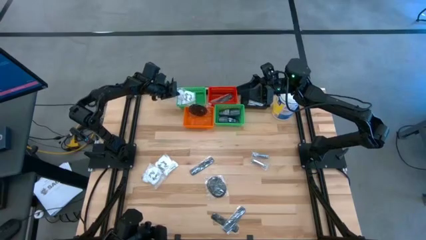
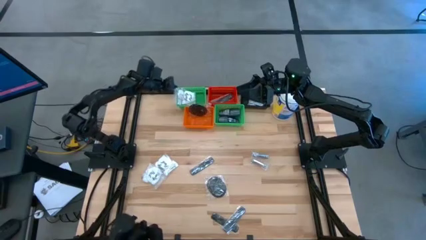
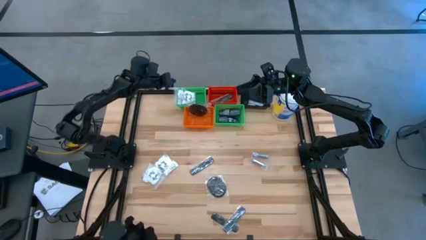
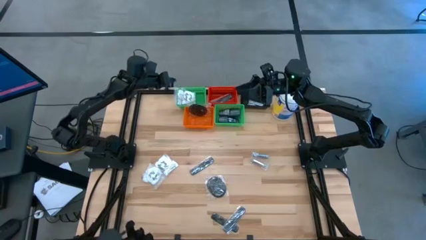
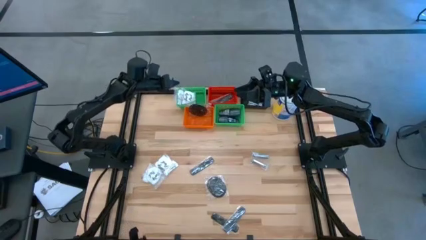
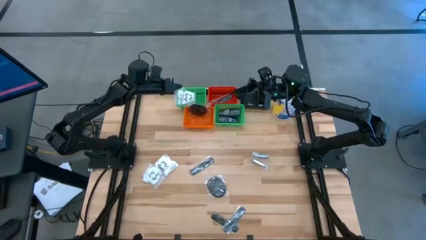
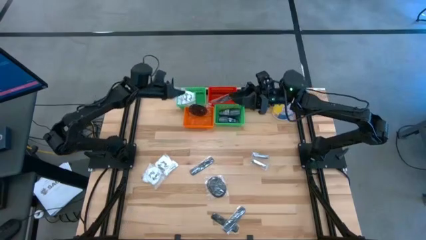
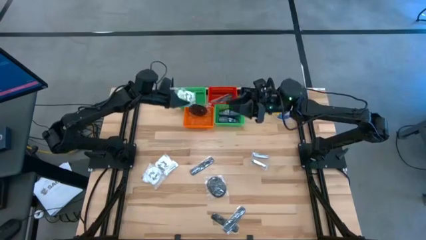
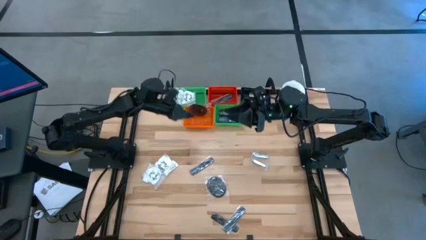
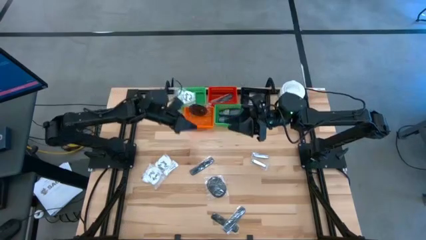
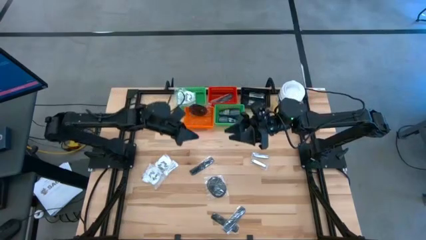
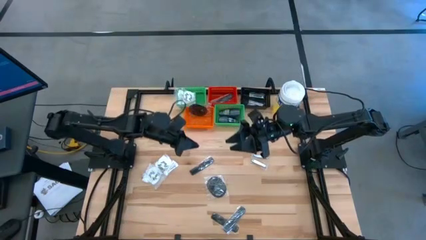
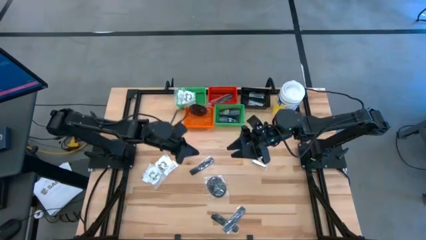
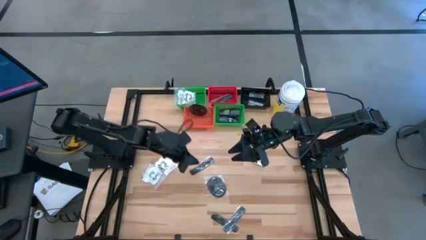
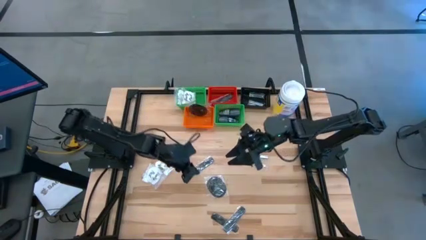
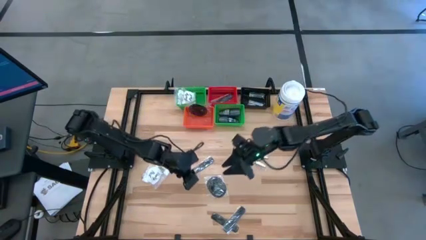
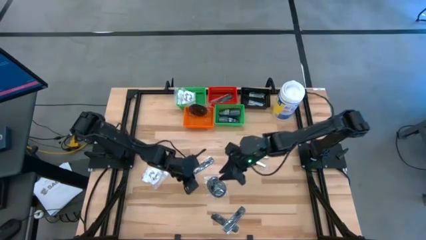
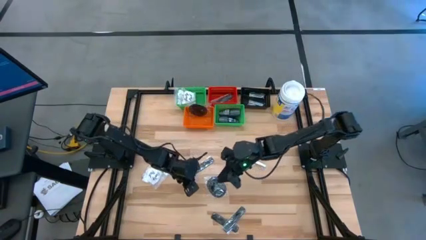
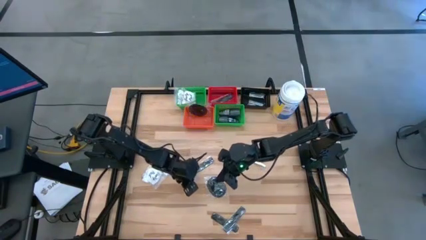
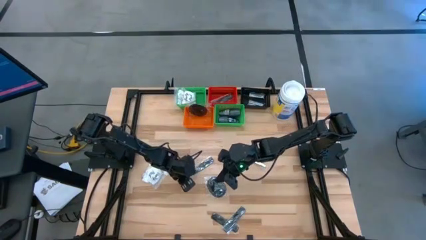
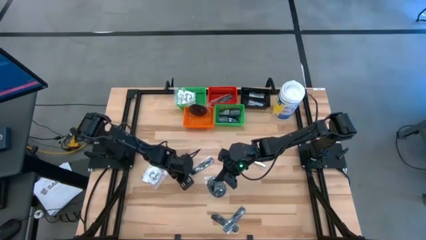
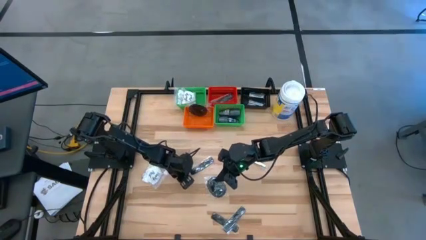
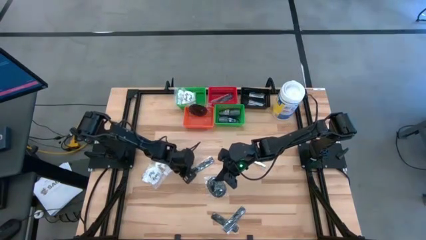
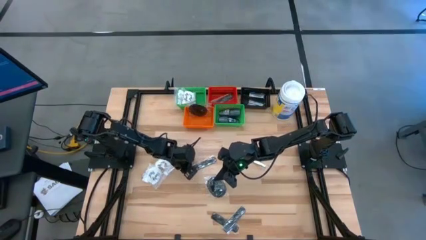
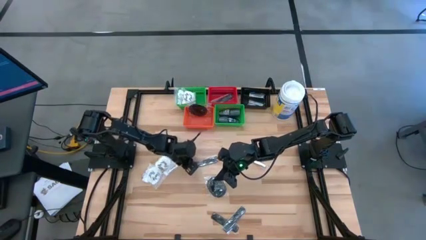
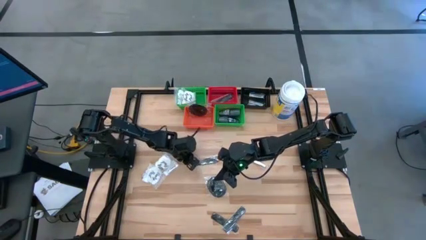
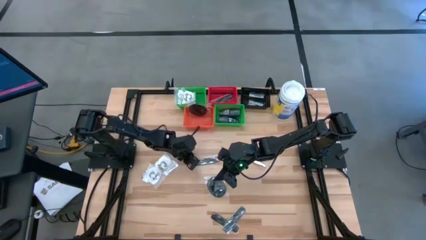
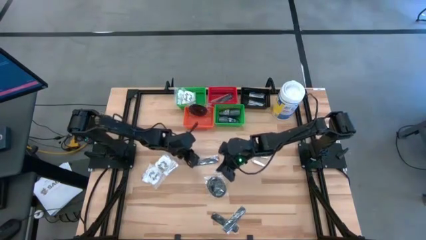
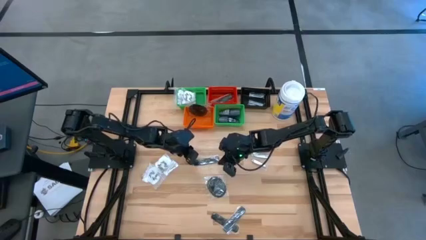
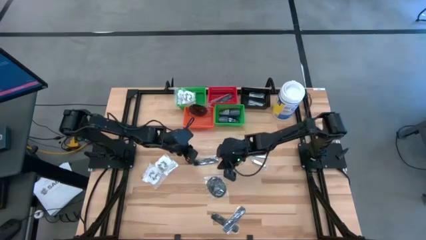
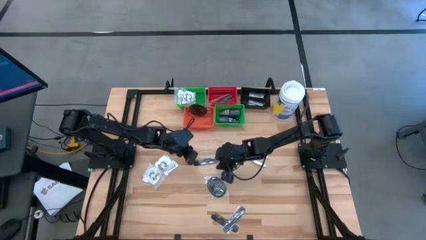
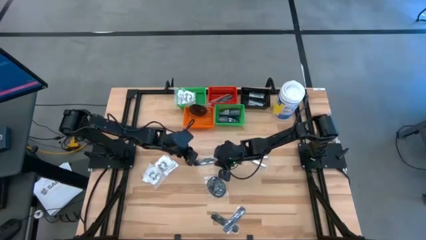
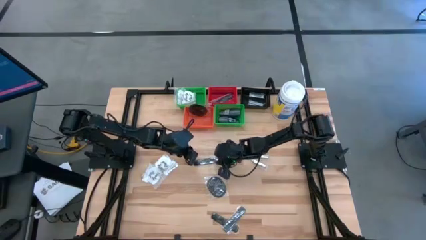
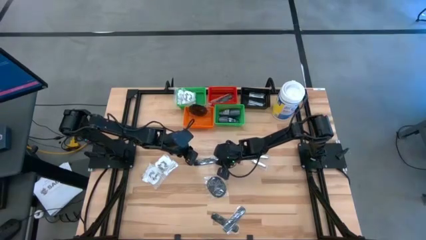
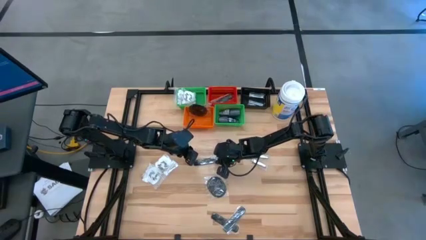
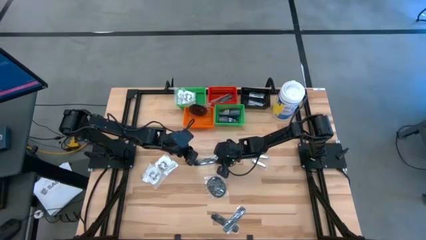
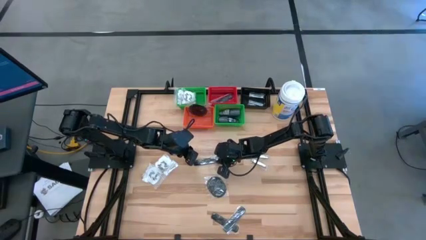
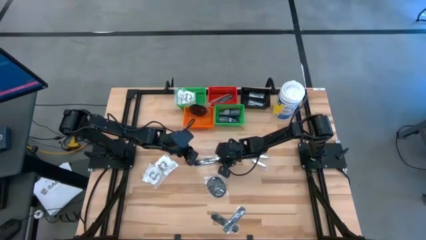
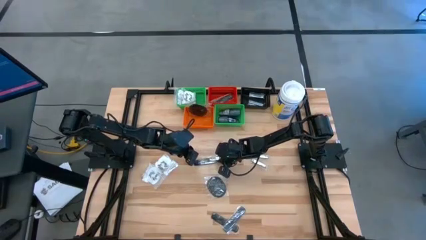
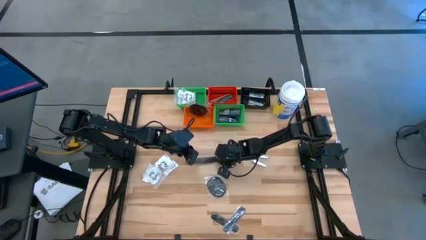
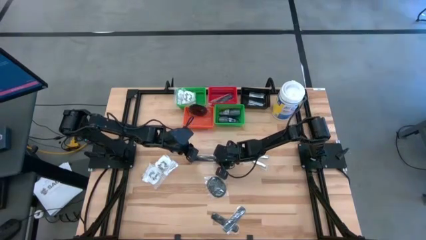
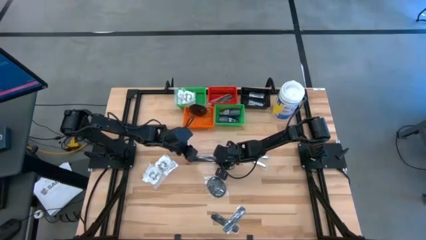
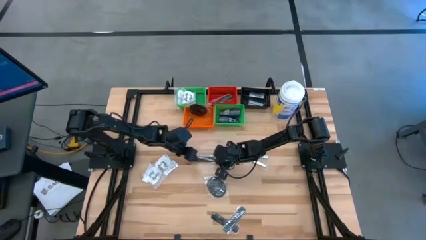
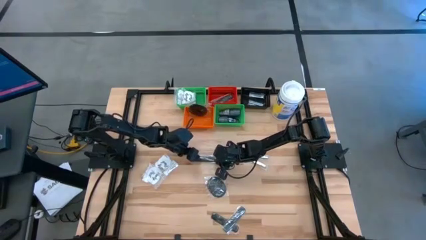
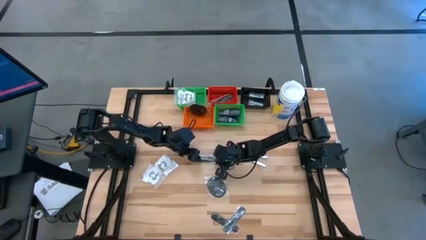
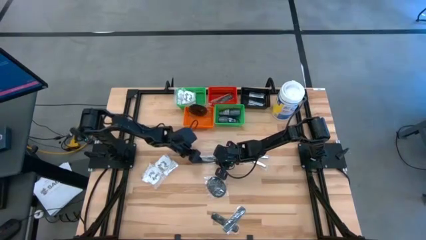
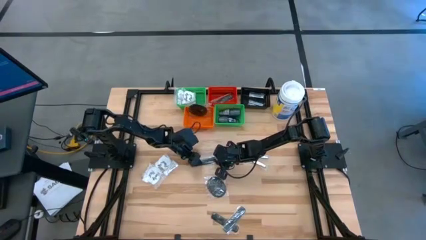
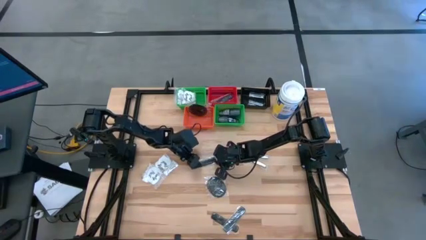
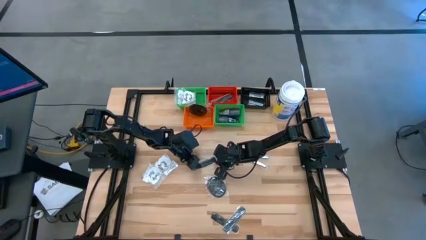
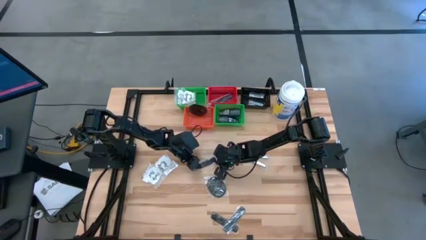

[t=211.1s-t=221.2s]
Task: Pick & Place Travel size toiletries
Put the black comb into the red bin

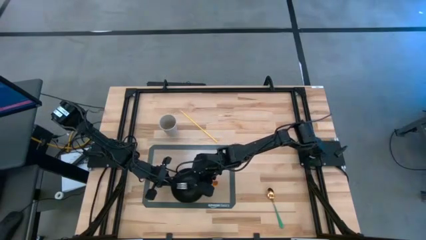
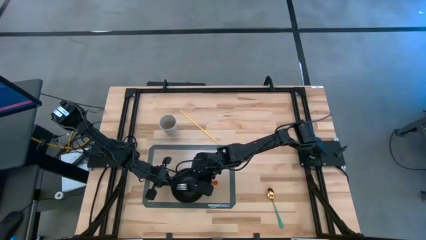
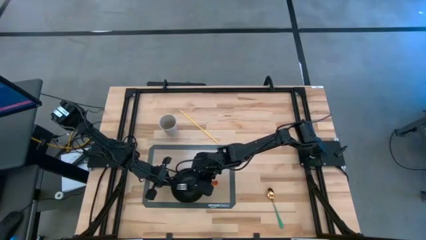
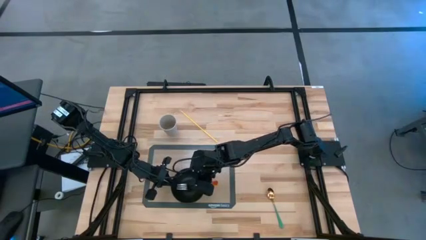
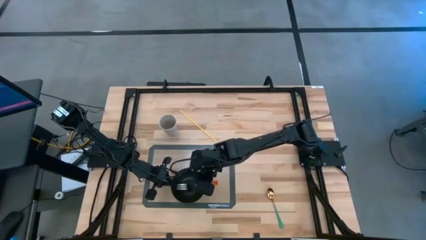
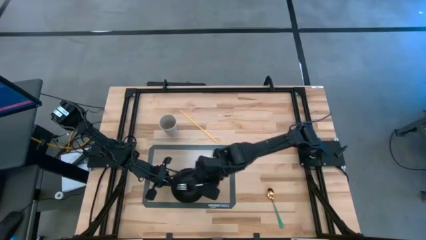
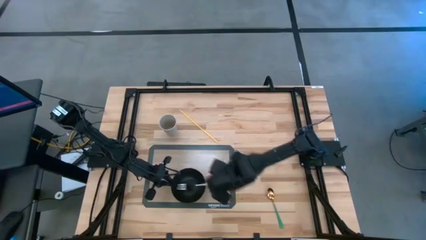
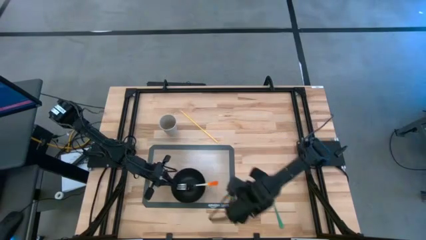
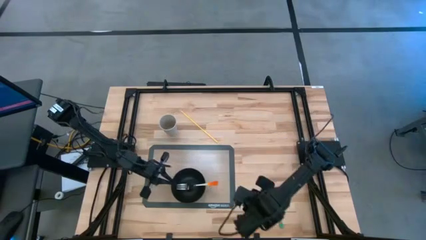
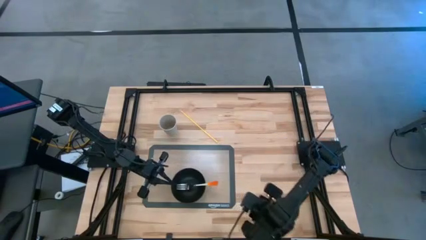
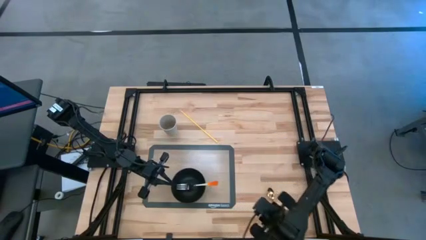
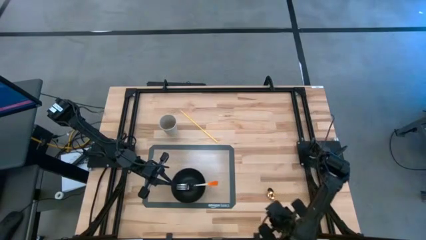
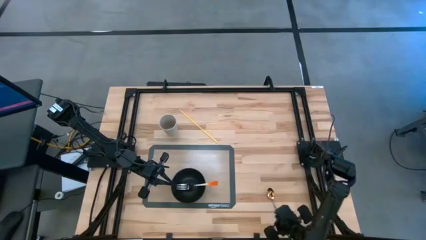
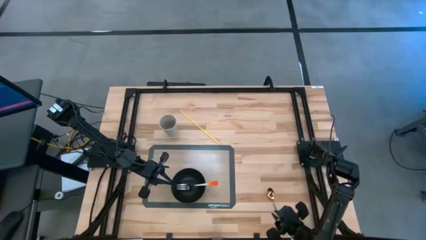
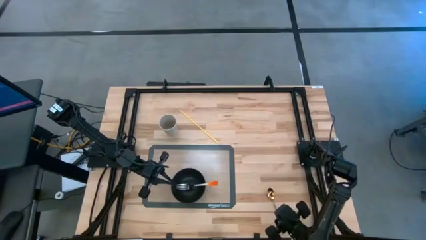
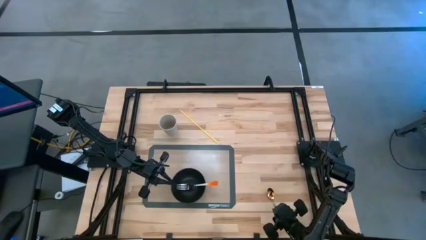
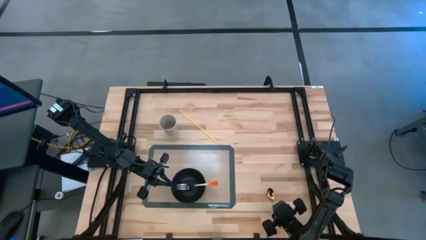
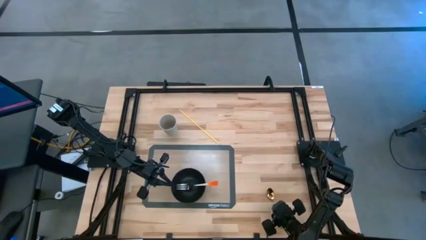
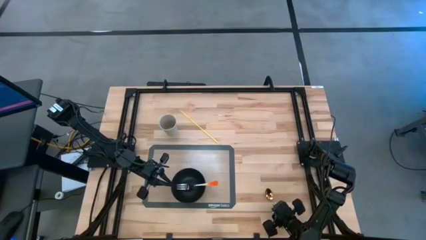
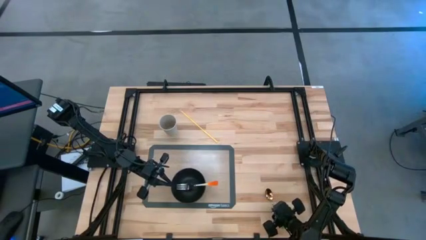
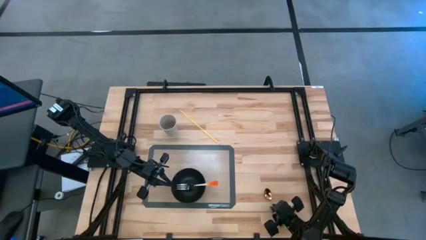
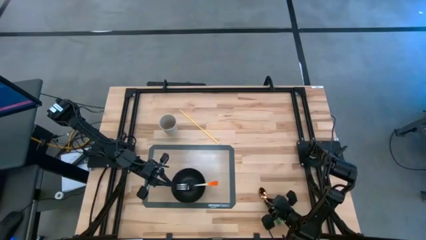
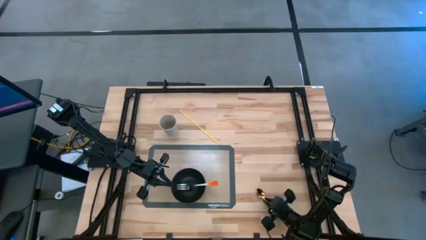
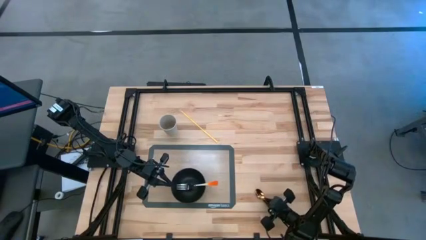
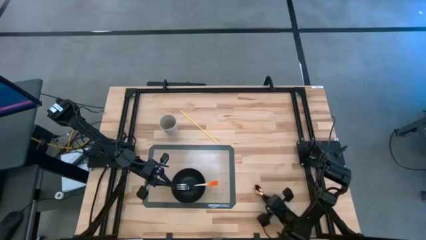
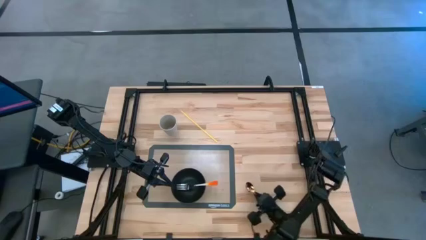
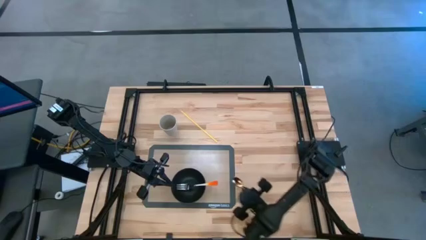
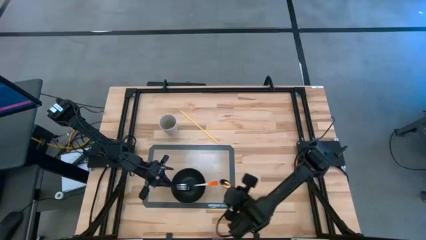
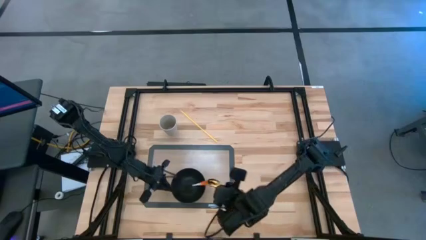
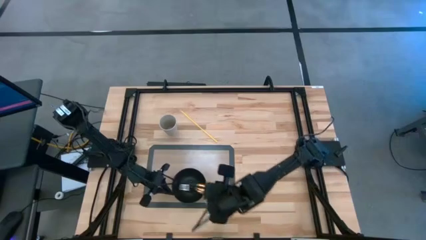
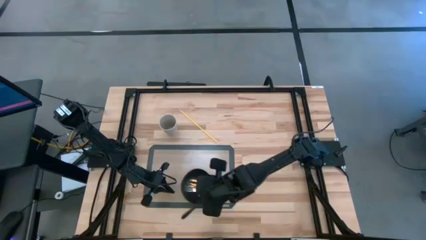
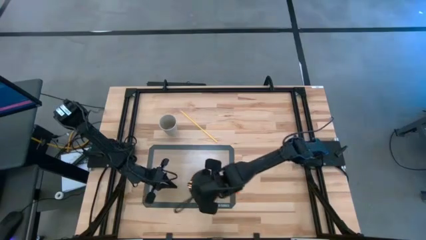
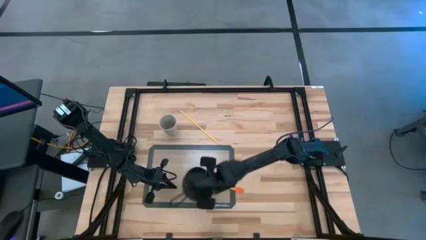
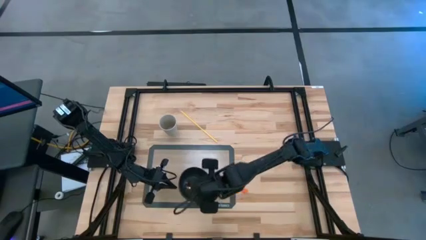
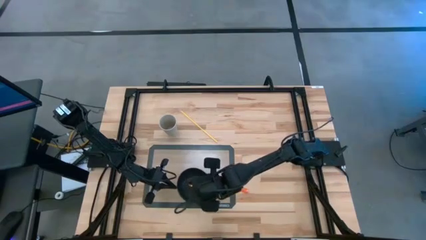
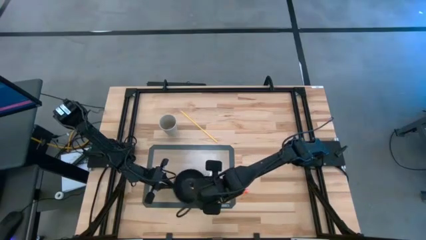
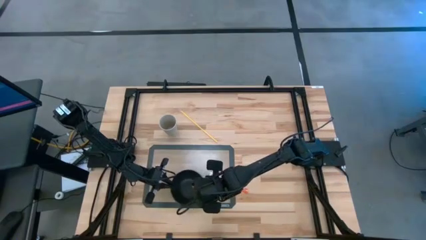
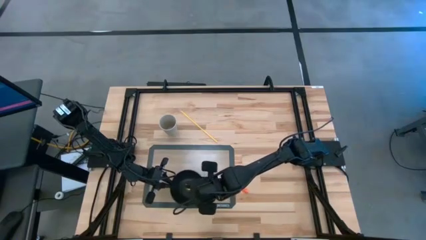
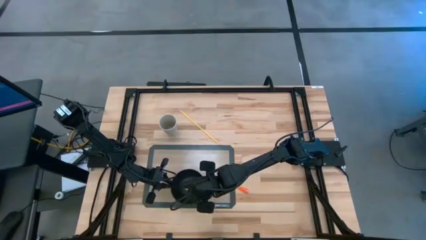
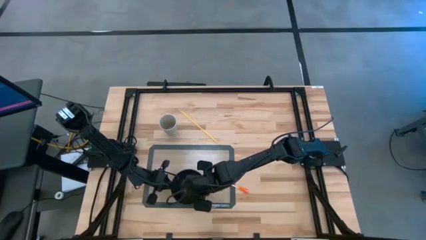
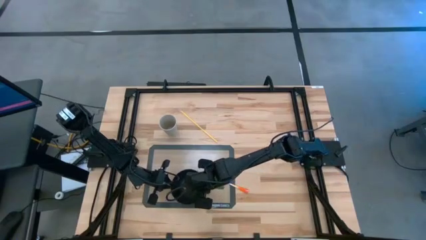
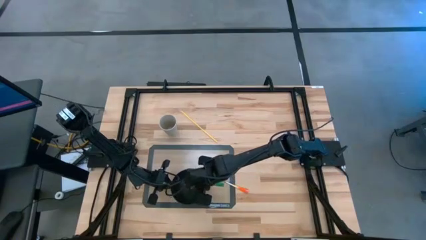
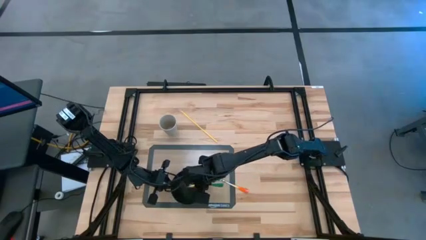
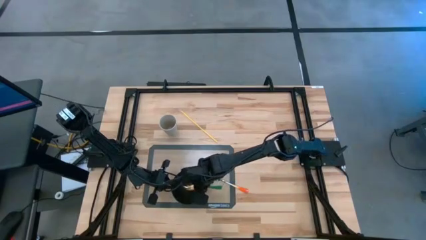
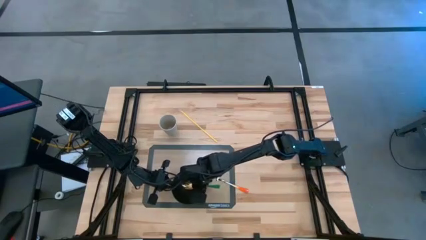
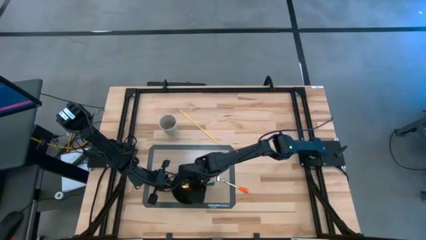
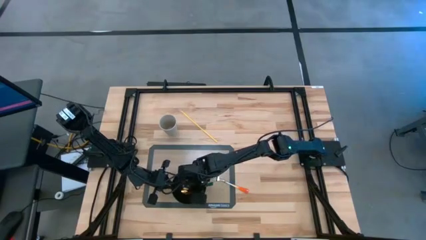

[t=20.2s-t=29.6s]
Task: Pick & Place Utensil
Put the green spoon into the black bowl on the mat
